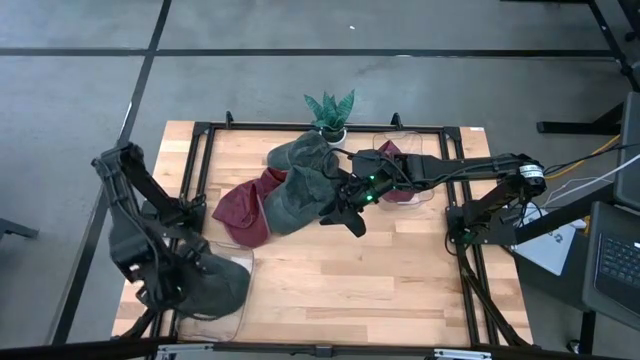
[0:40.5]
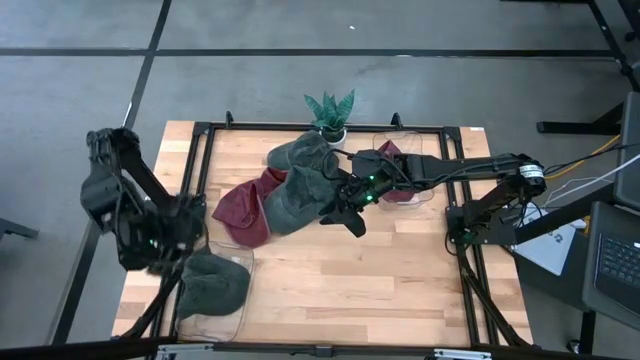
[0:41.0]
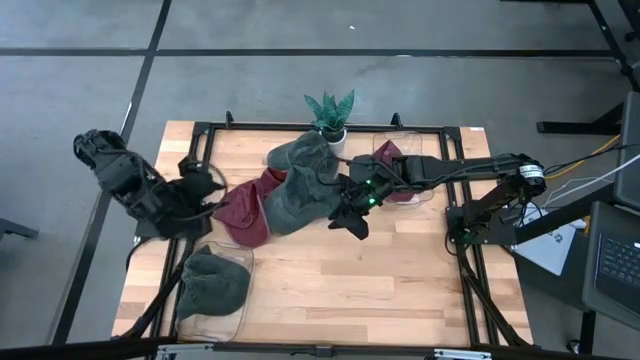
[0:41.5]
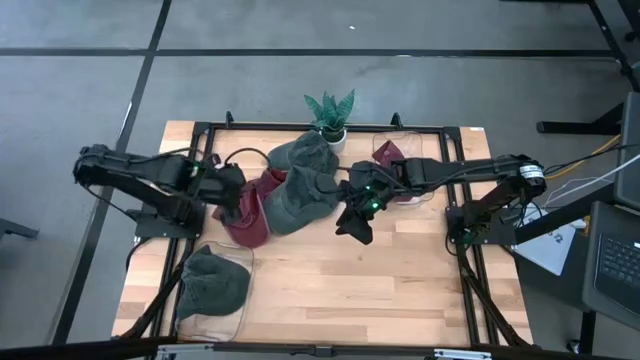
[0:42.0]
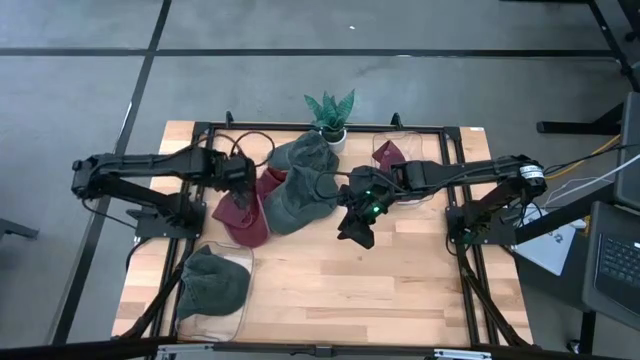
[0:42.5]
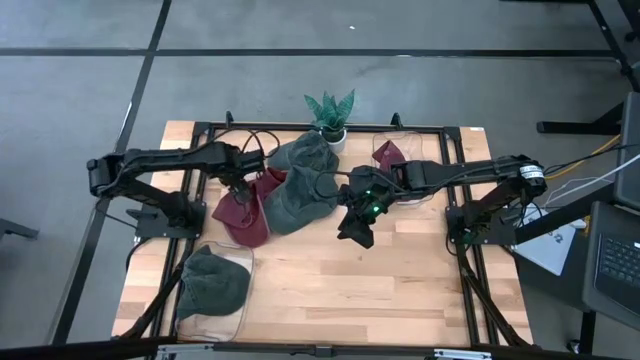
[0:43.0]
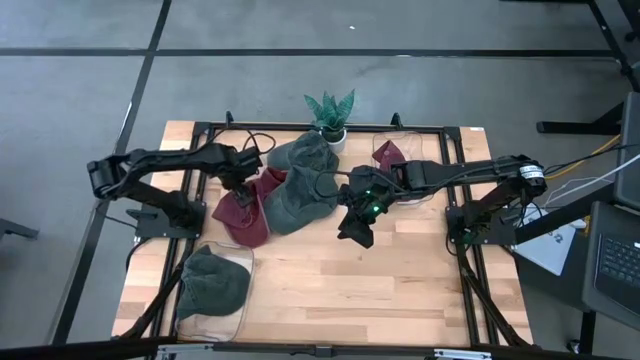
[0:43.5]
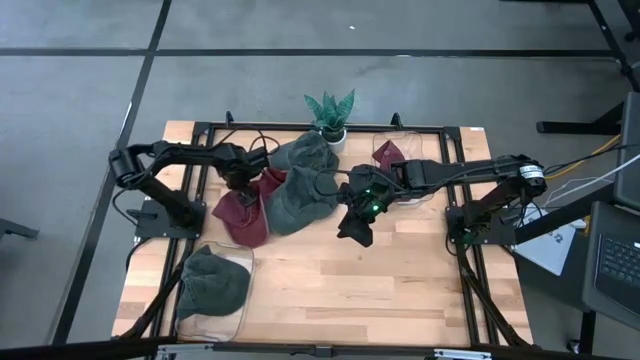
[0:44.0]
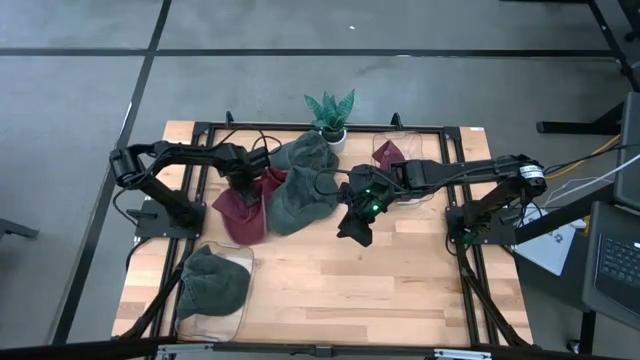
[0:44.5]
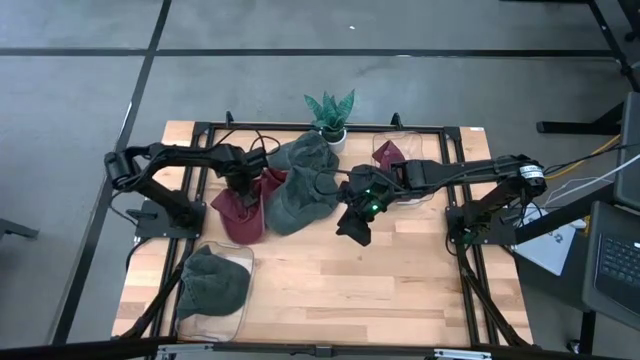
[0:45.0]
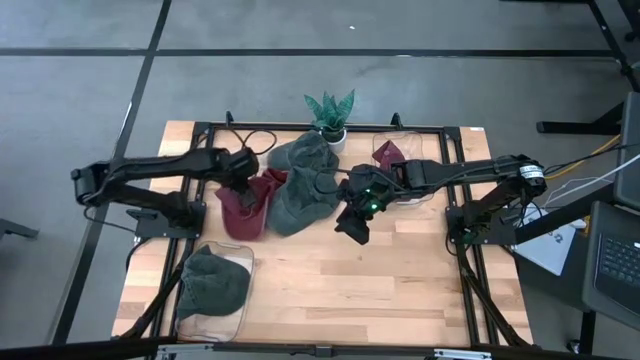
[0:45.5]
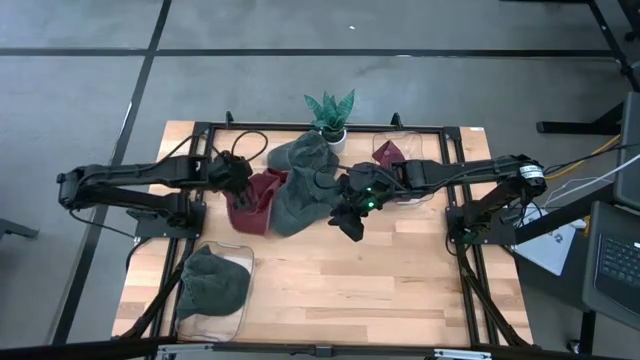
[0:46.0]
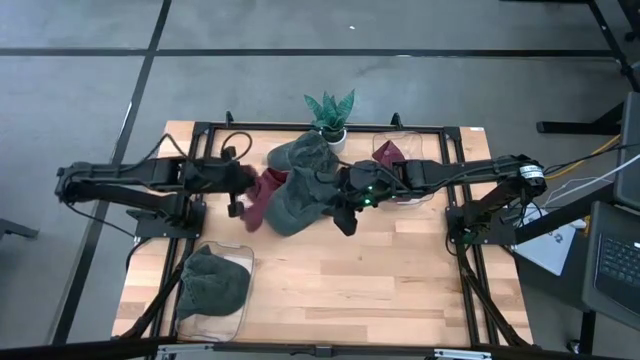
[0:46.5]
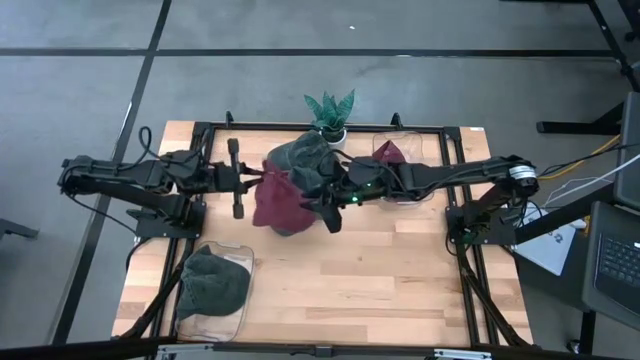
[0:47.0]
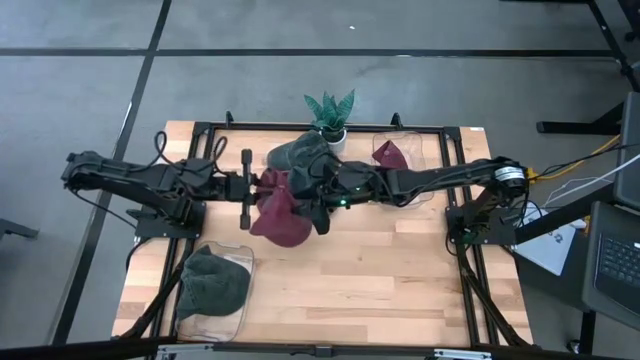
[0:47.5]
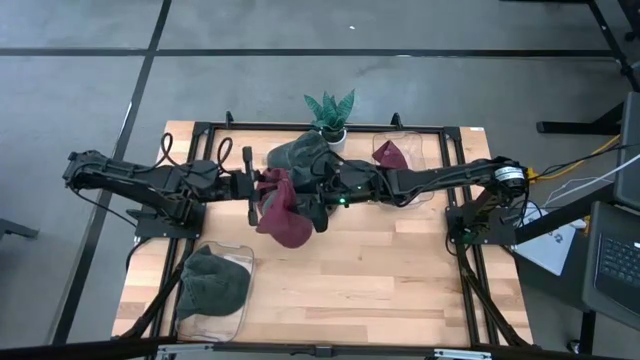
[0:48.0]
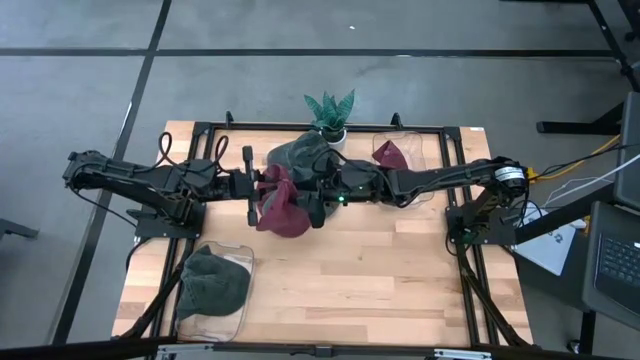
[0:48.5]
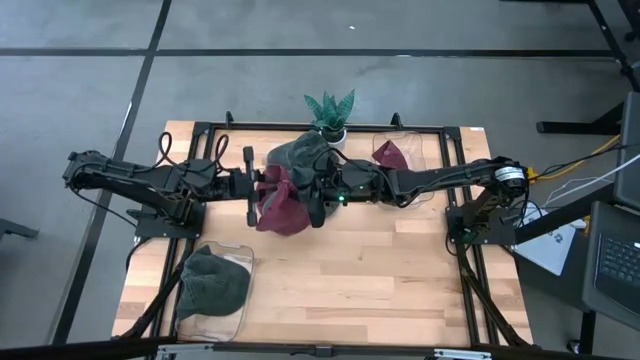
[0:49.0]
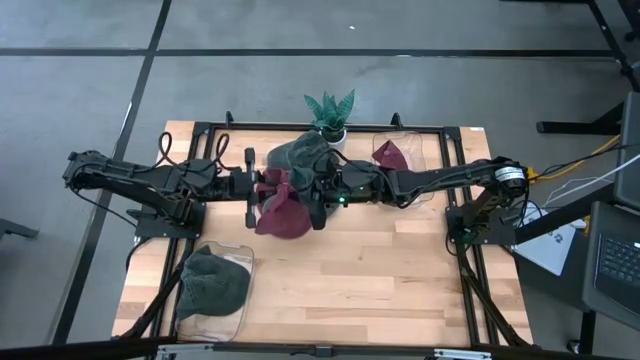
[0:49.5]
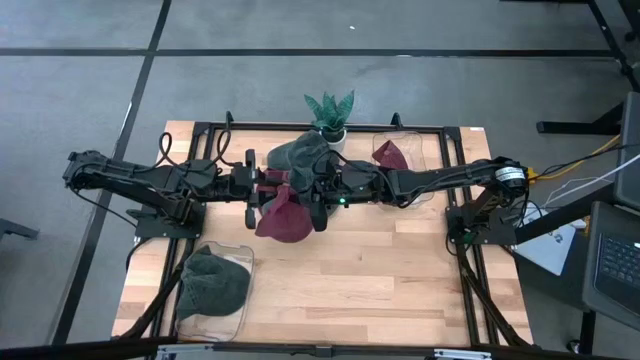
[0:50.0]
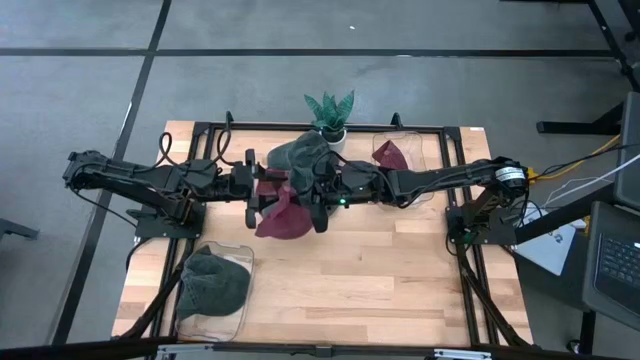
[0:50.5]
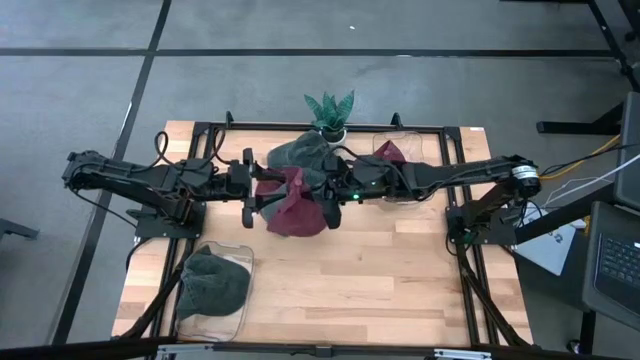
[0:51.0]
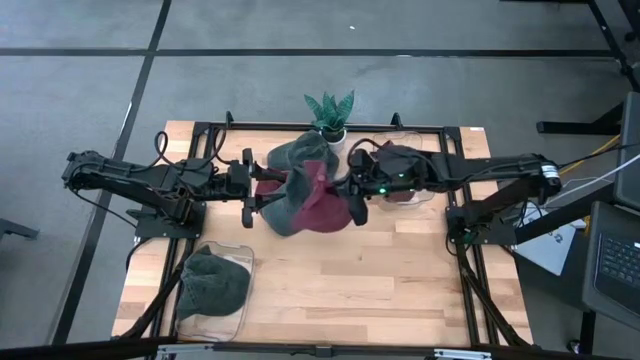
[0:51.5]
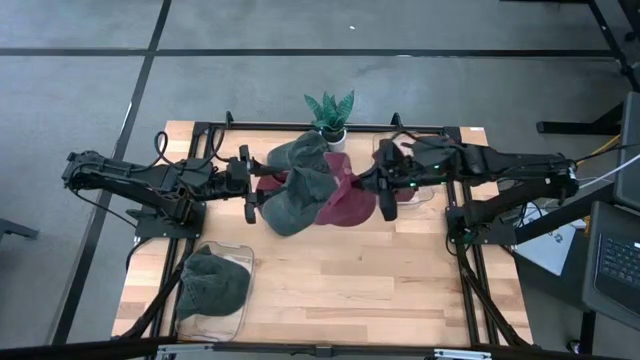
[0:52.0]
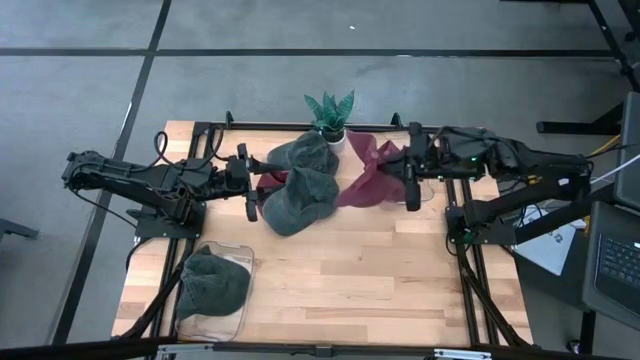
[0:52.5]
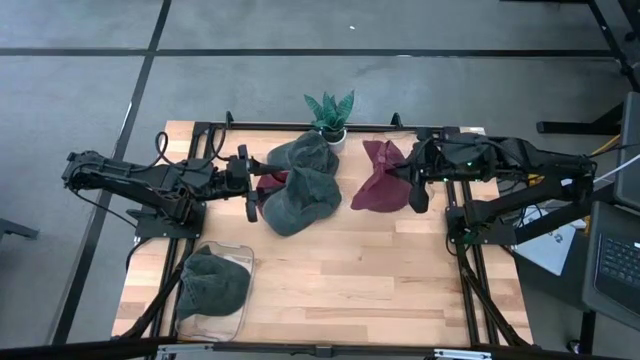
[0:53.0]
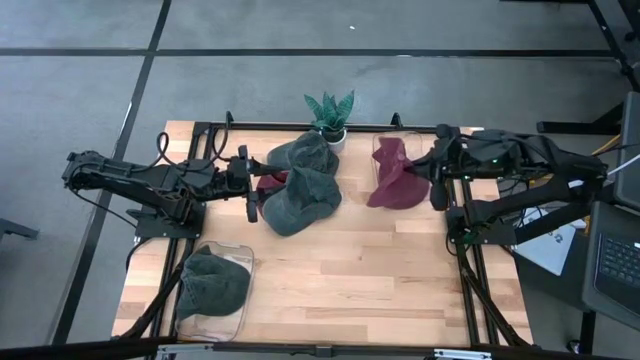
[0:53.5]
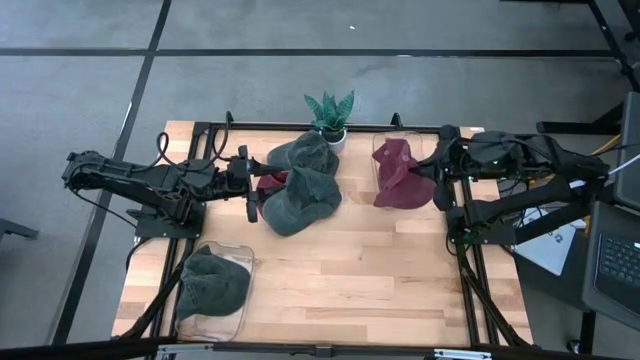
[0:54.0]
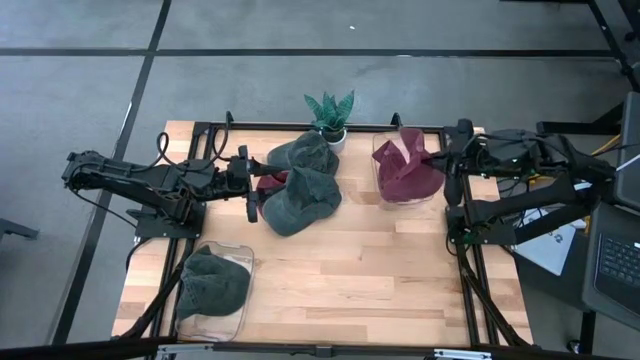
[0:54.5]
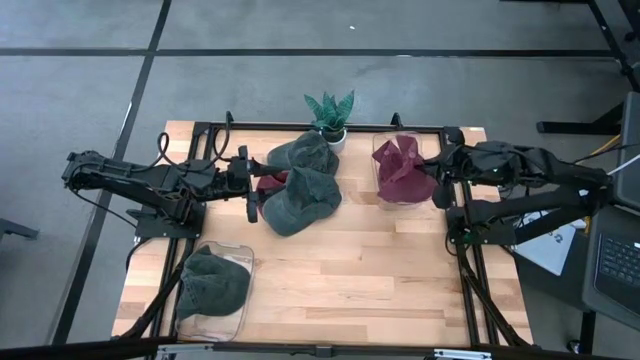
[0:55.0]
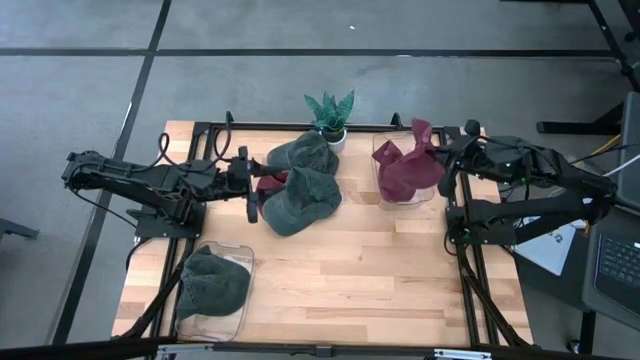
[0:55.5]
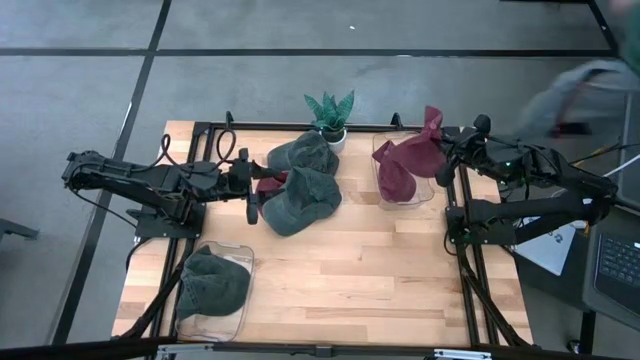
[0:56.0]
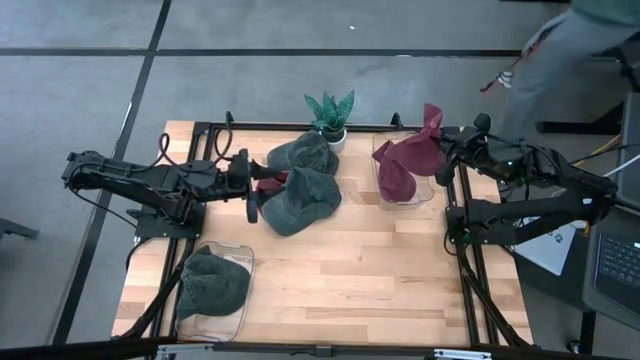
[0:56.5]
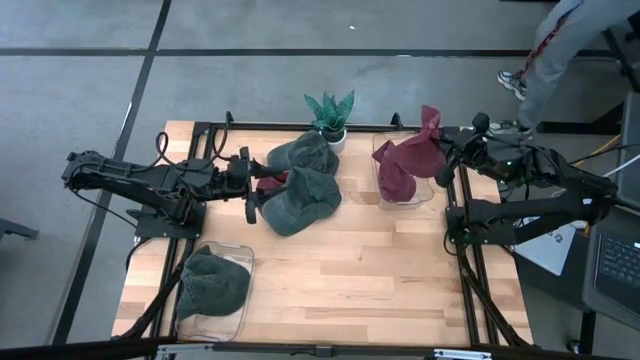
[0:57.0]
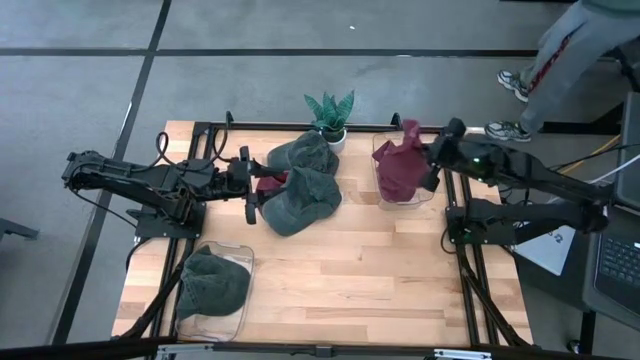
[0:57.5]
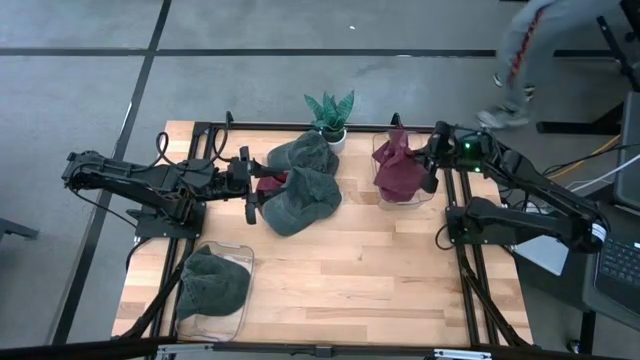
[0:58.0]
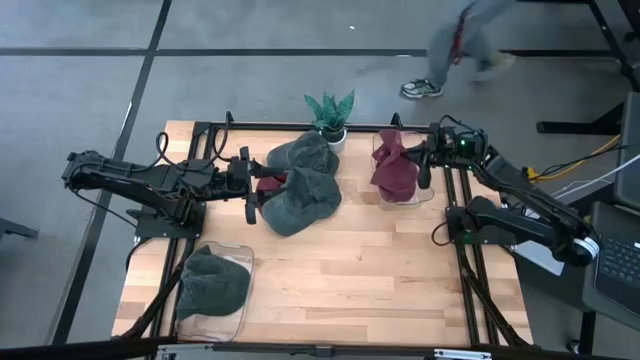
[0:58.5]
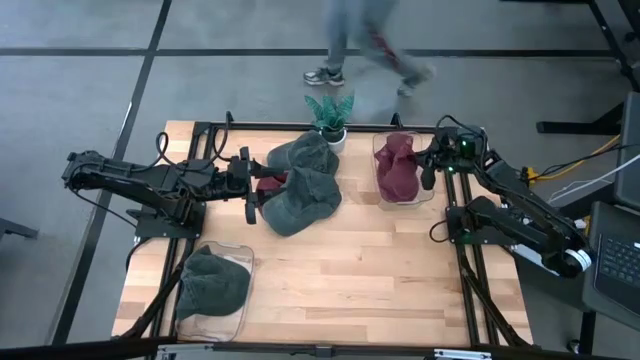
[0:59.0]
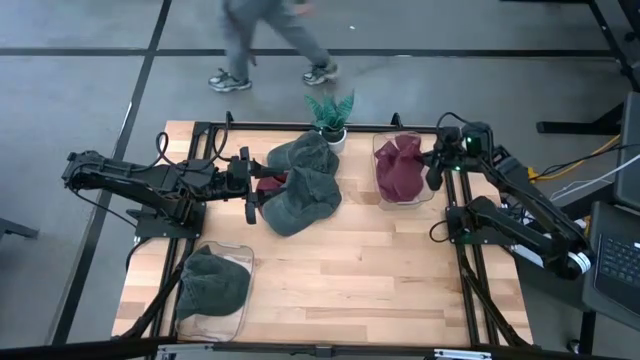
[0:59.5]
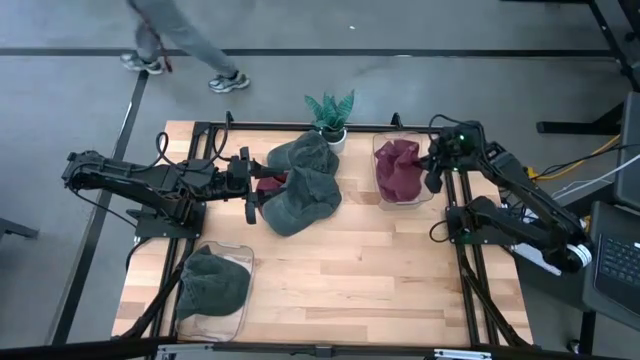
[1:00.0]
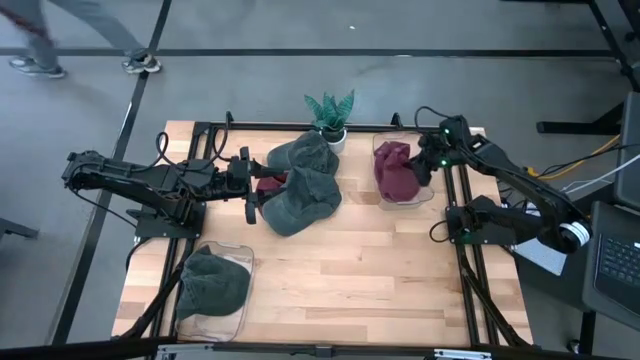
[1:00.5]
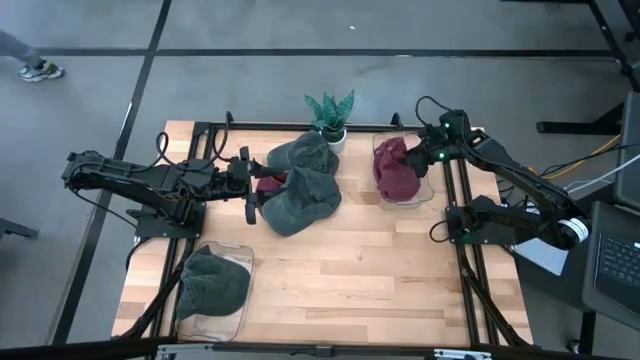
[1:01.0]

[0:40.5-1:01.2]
Task: Pick & Place hat
Put the left red cap into the top transparent bin
